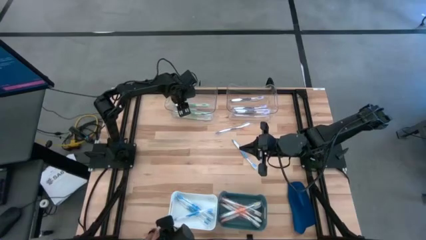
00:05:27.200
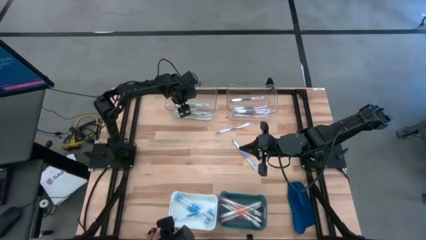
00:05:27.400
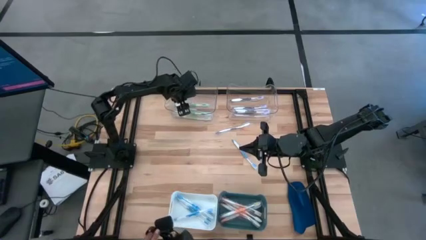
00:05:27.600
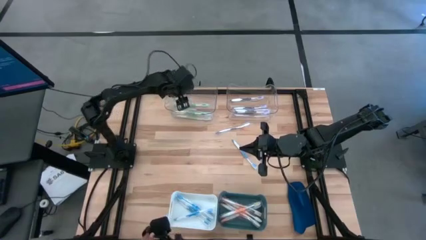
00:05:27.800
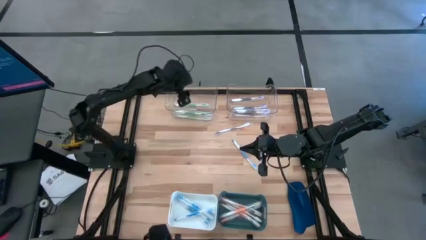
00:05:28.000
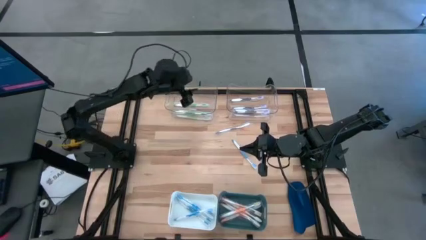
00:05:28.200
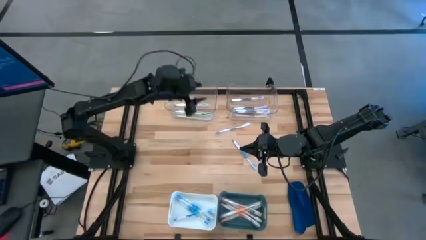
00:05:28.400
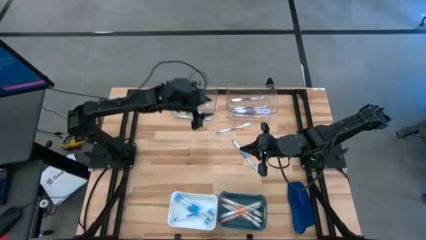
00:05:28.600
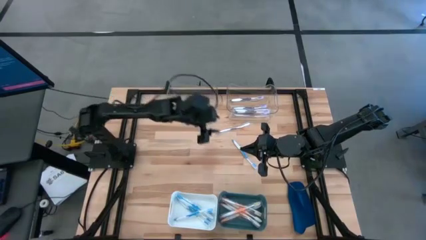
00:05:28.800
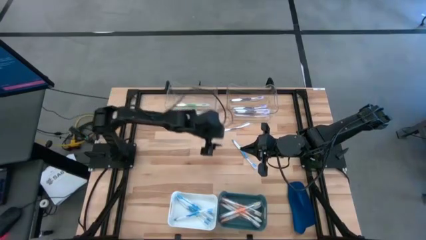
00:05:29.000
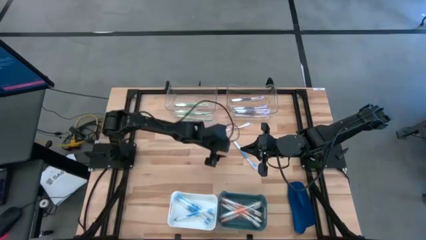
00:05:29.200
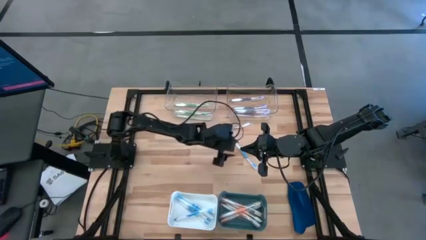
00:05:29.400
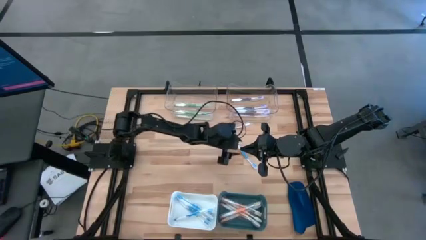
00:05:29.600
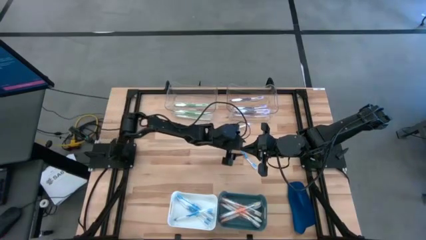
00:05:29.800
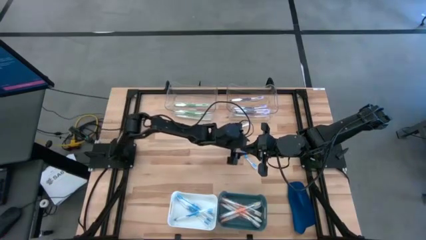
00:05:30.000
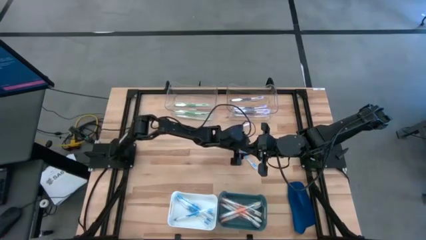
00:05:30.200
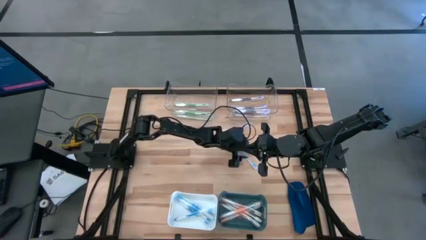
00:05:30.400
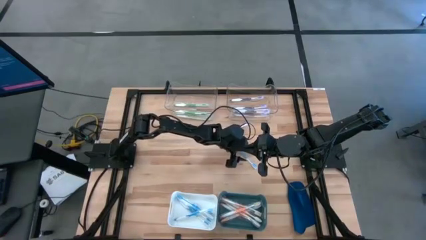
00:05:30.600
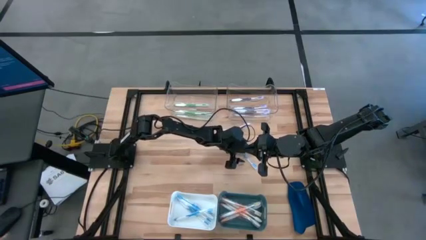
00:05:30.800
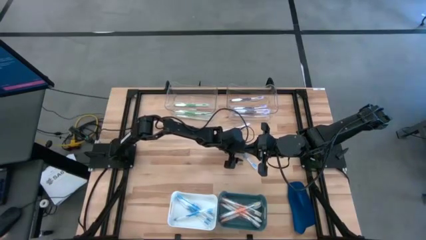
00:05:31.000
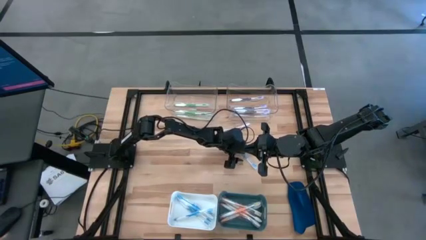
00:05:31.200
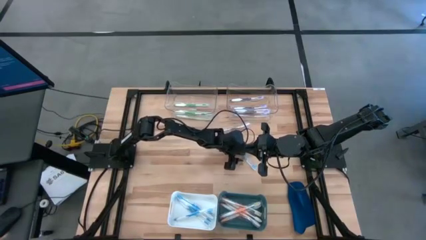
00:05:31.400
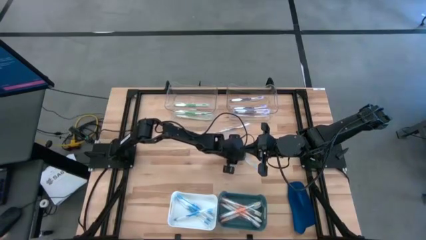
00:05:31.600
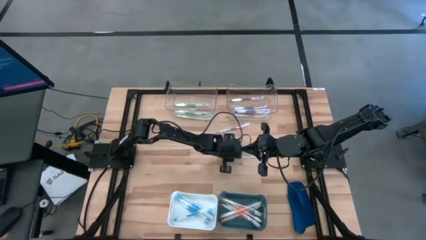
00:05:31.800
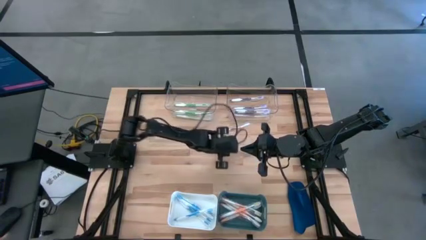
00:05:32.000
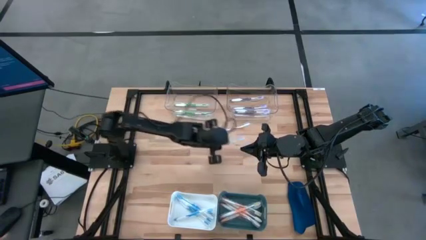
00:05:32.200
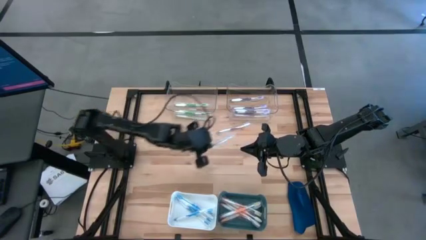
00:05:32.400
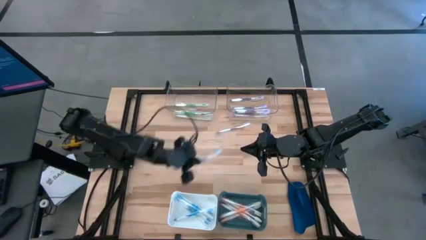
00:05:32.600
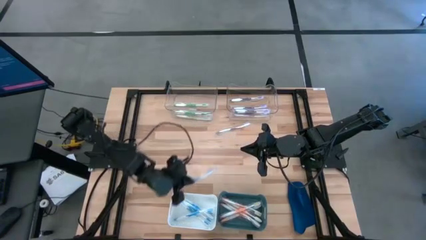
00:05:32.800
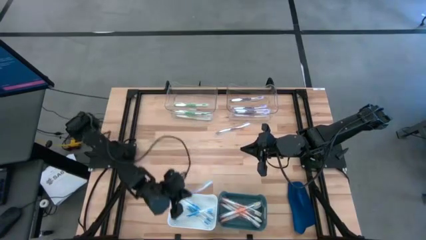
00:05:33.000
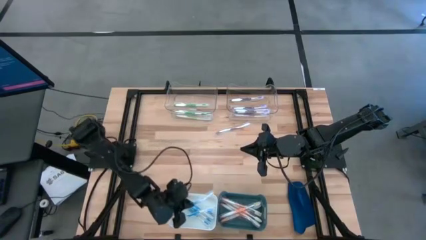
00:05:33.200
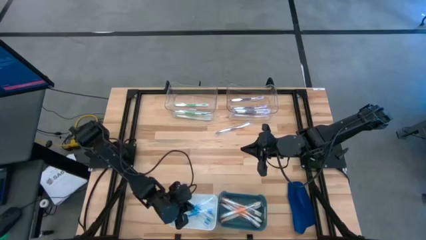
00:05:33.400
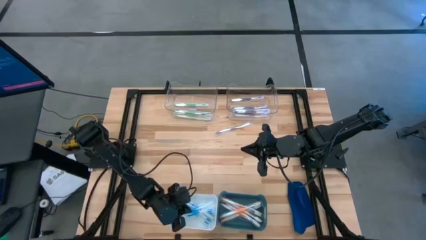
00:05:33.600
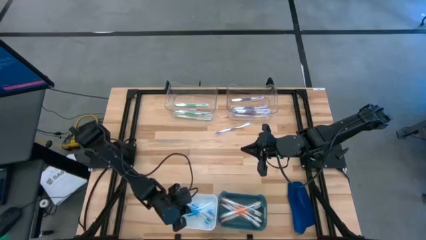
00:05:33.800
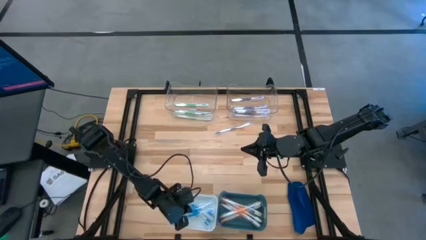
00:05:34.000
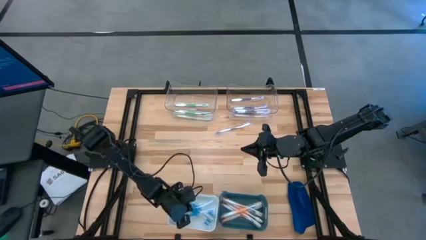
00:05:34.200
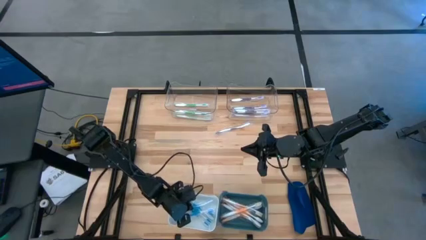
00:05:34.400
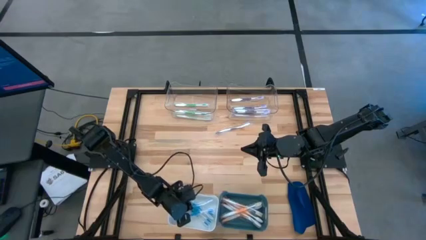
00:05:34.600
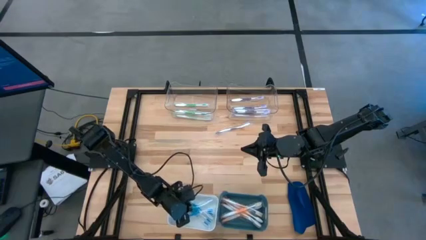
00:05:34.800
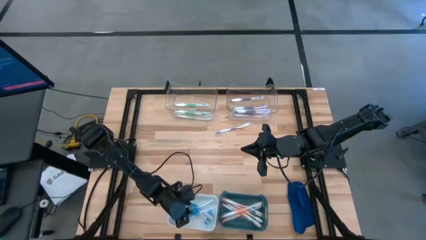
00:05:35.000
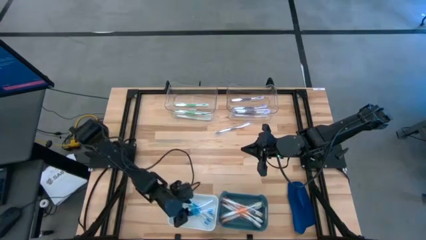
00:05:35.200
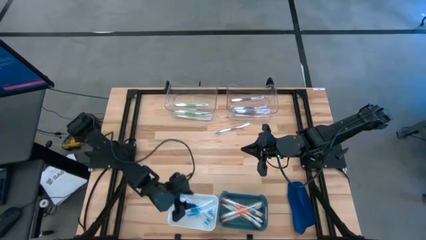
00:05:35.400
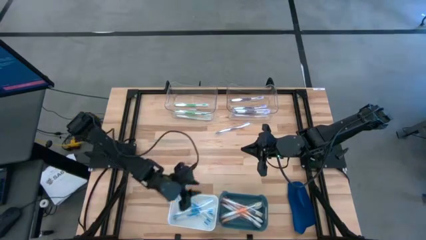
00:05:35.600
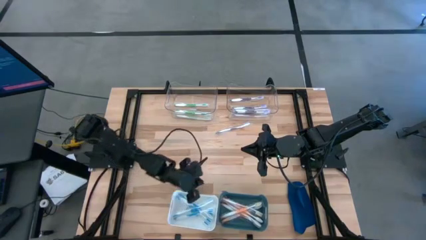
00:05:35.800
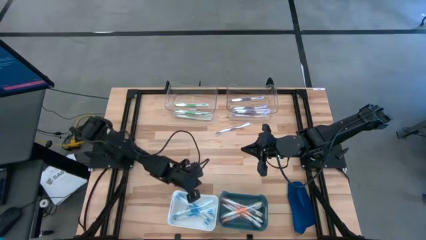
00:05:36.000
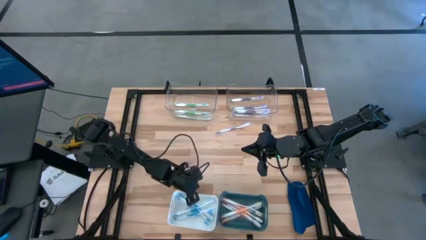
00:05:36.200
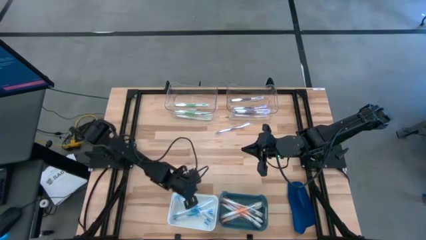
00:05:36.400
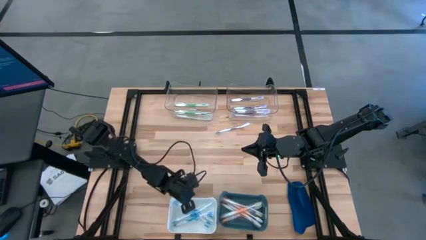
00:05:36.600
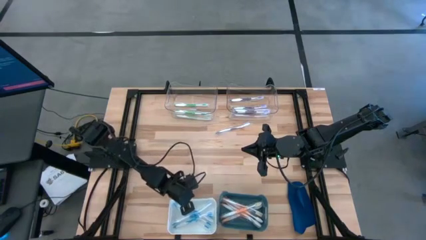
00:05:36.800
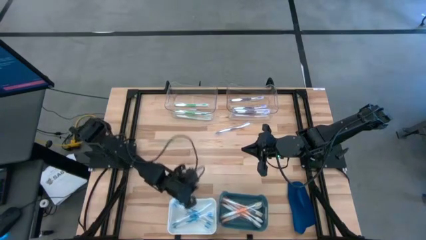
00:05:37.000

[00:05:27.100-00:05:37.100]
Task: Pick & Place Toothbrushes
Put the blue toothbrush into the white bin

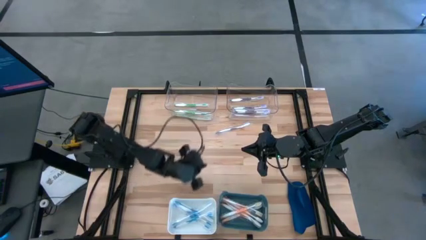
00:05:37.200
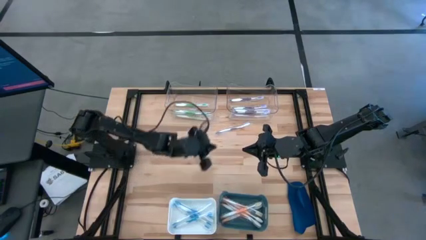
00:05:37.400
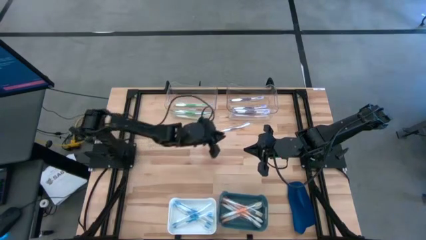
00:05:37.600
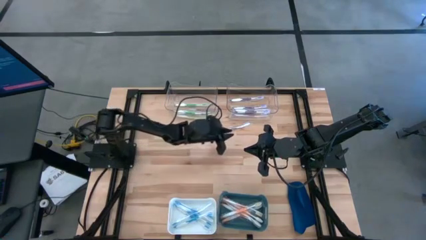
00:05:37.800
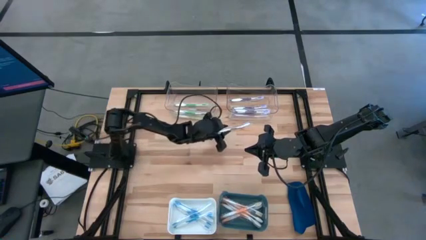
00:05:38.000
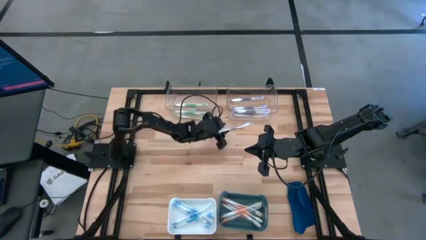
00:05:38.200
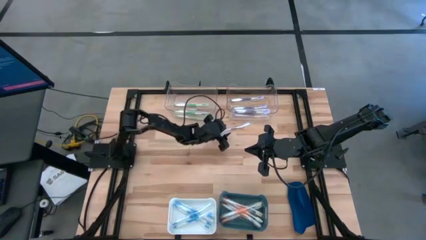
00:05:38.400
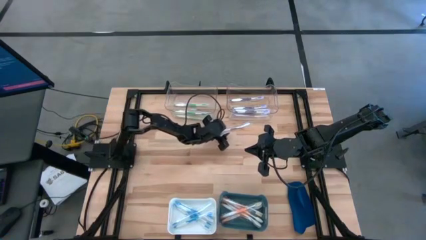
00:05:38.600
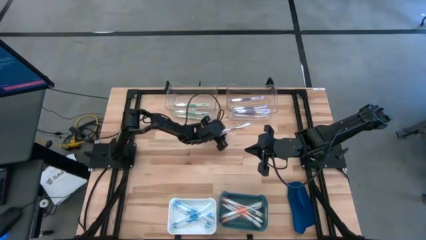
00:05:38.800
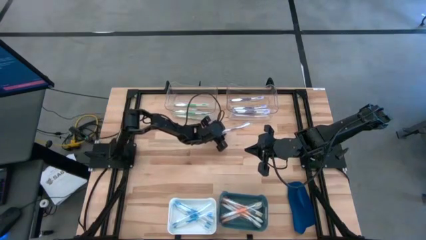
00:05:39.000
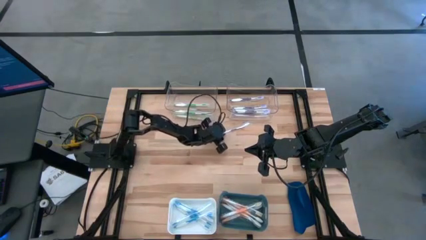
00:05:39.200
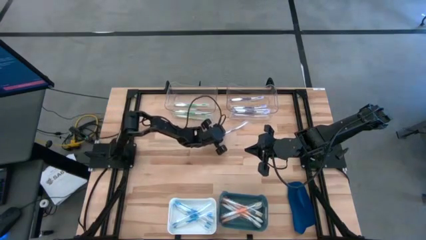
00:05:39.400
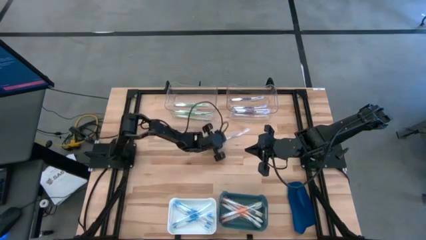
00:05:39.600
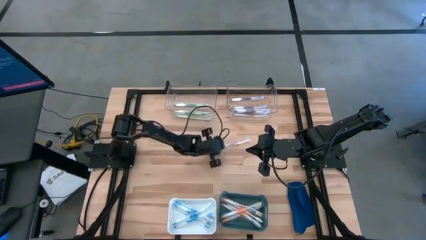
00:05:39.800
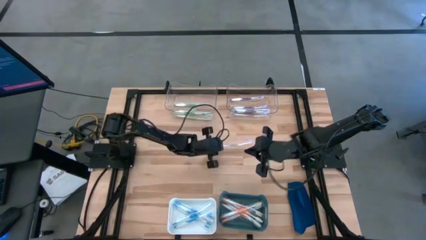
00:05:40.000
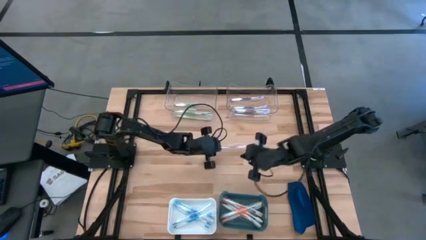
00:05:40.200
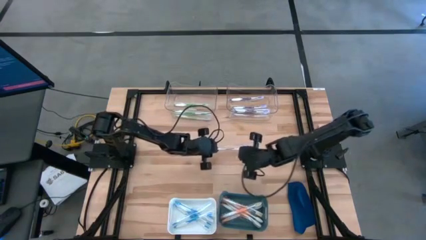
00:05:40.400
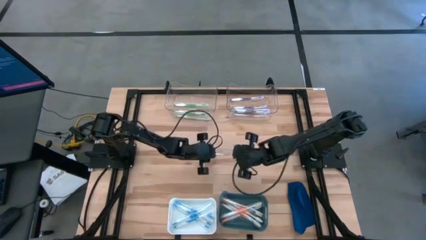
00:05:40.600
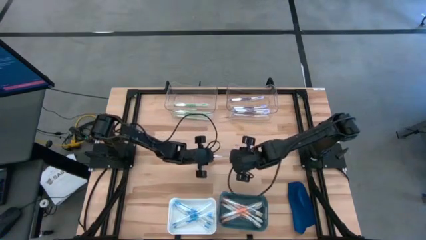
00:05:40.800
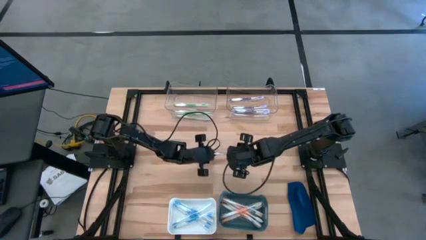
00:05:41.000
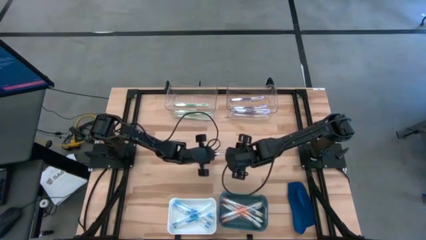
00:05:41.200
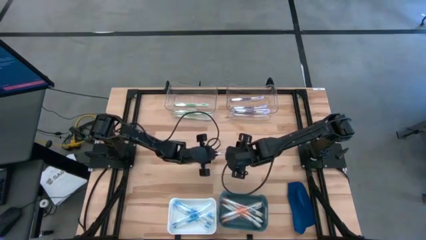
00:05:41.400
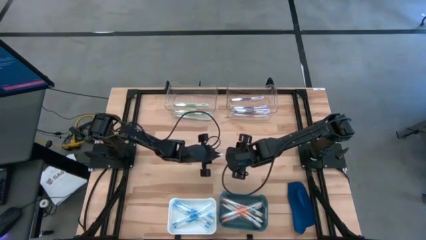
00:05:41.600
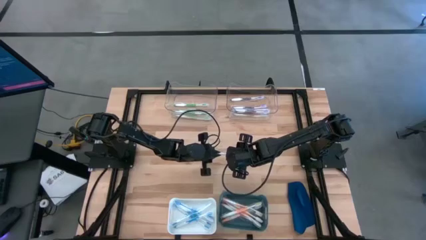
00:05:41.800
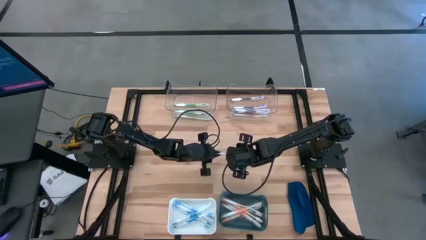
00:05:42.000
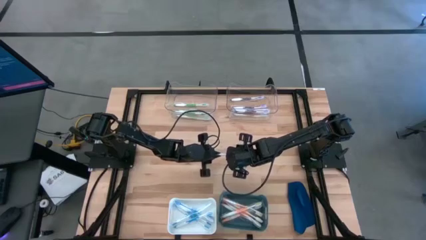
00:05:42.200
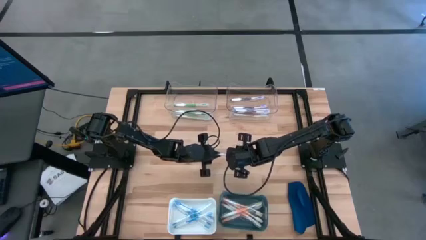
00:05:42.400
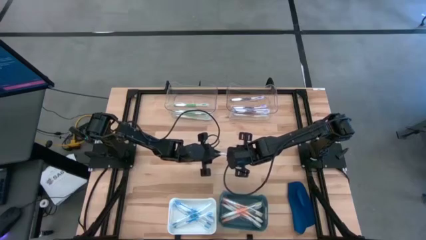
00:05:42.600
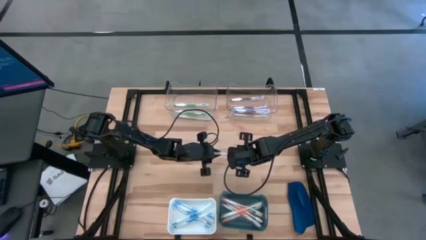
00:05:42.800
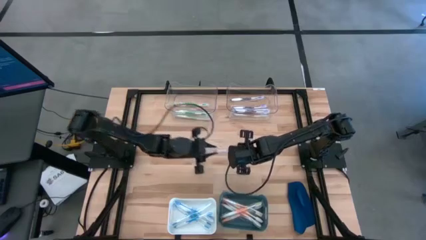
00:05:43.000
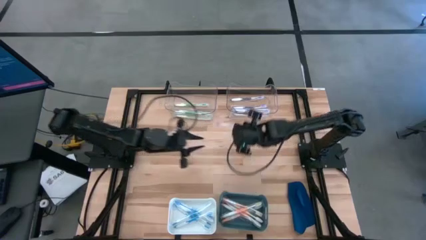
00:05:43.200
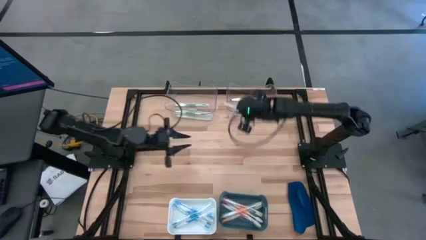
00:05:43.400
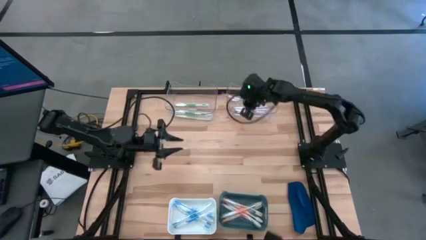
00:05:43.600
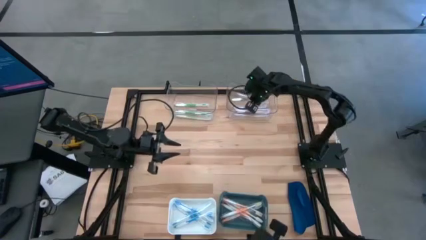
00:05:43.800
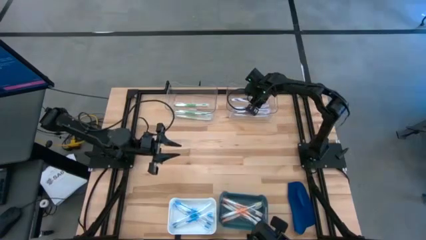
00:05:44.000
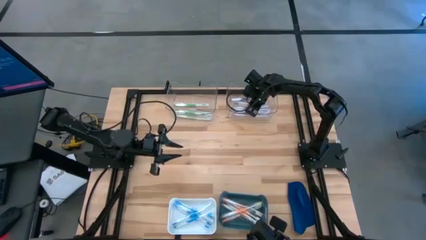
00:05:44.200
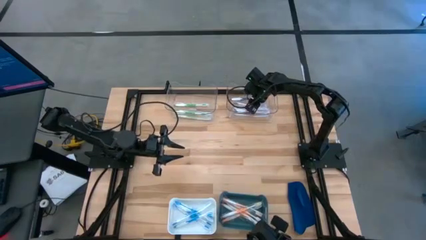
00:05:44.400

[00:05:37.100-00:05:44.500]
Put the purple toothbrush into the right transparent bin
